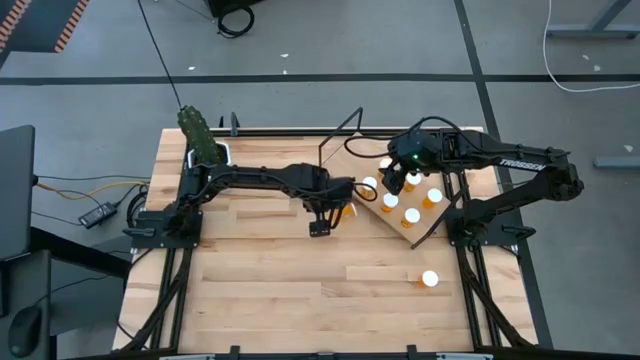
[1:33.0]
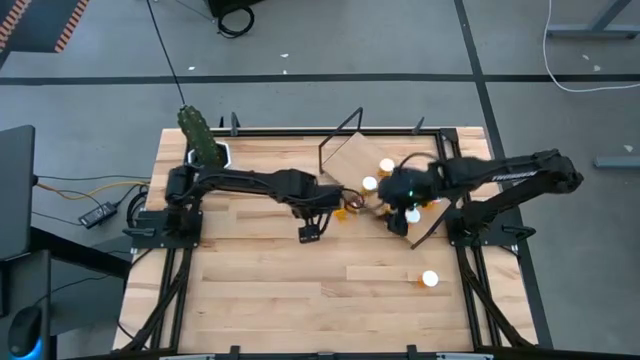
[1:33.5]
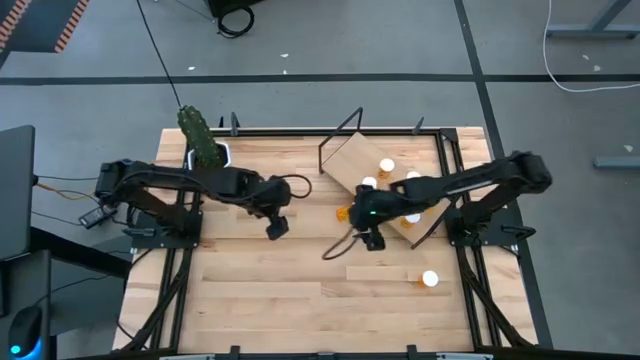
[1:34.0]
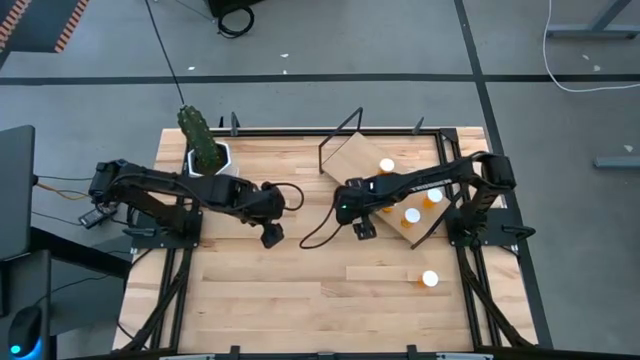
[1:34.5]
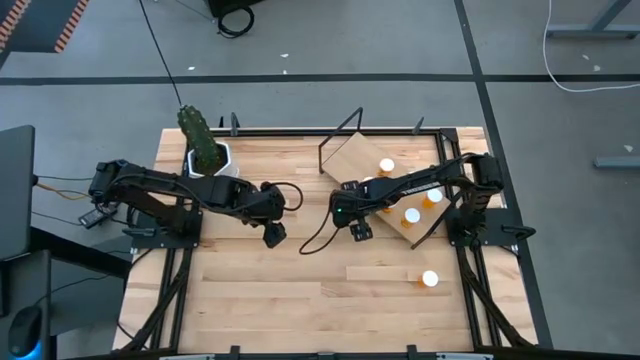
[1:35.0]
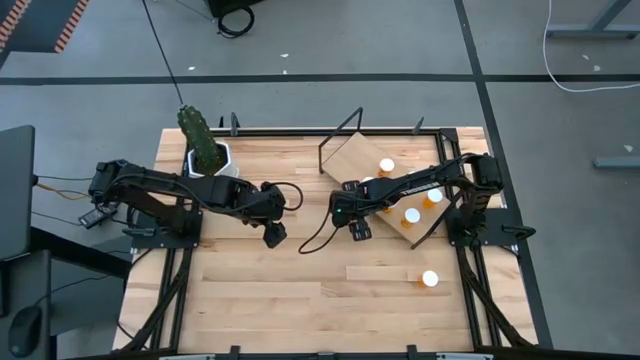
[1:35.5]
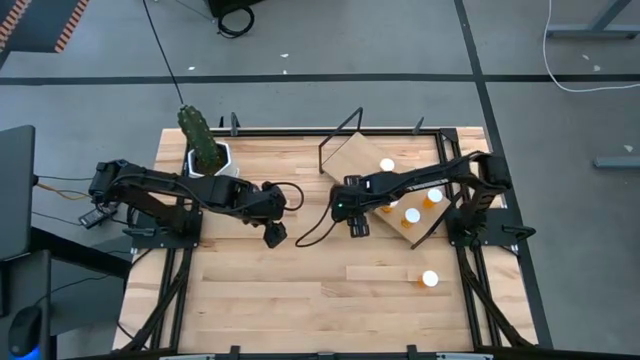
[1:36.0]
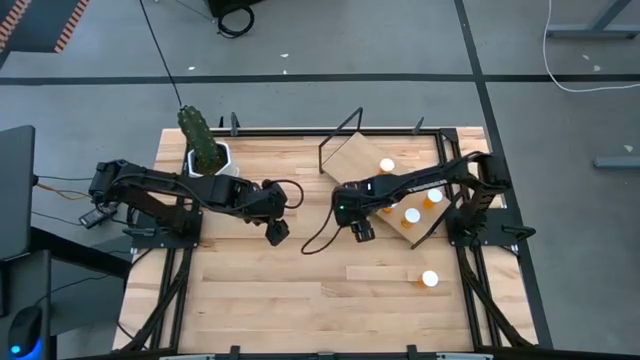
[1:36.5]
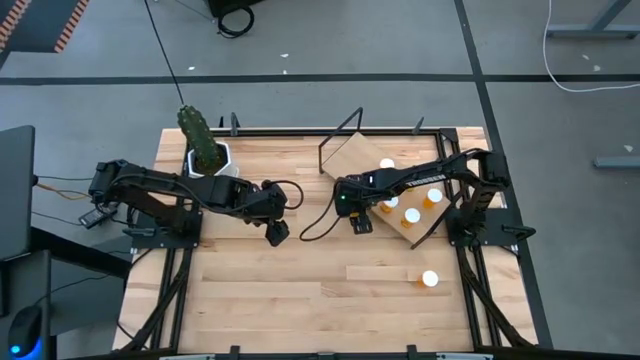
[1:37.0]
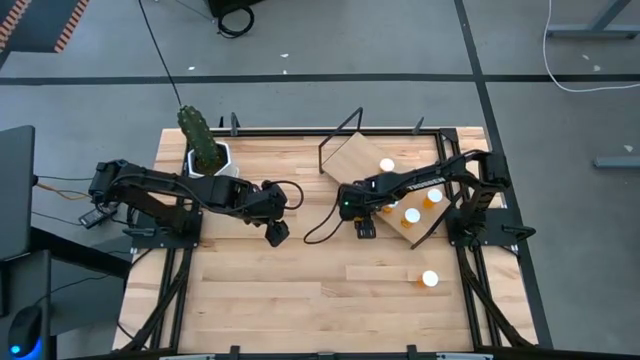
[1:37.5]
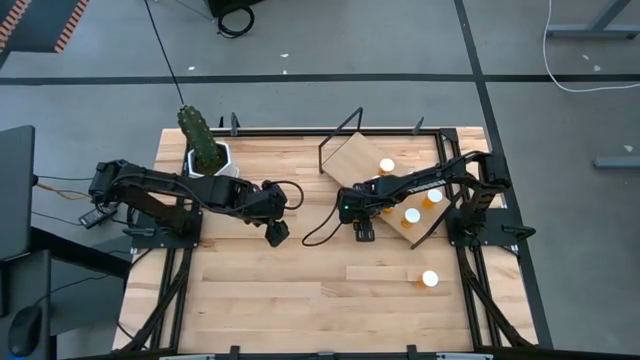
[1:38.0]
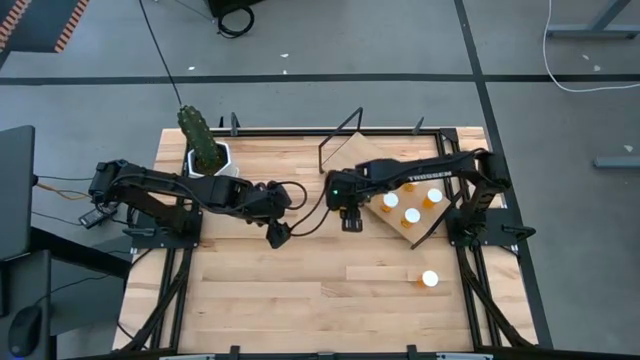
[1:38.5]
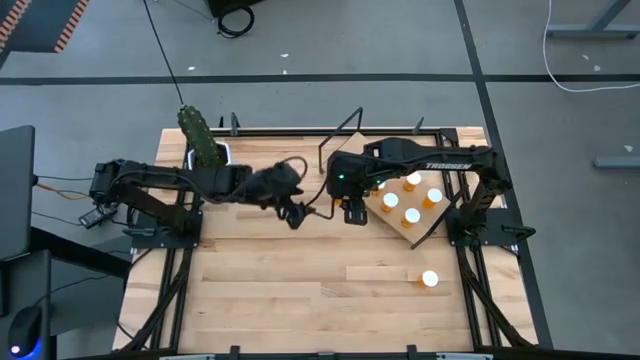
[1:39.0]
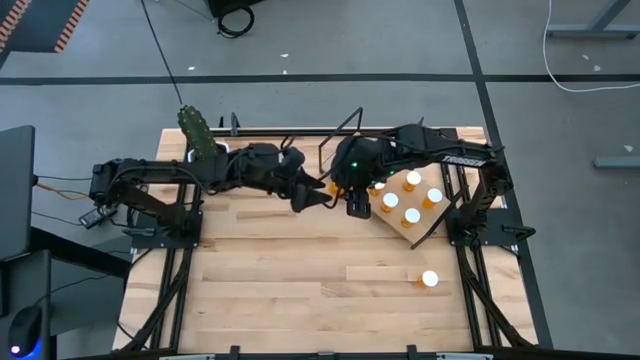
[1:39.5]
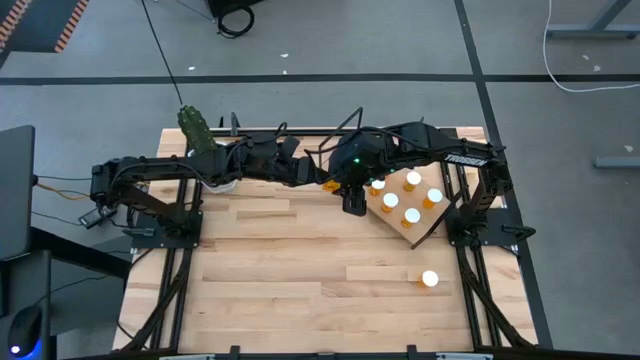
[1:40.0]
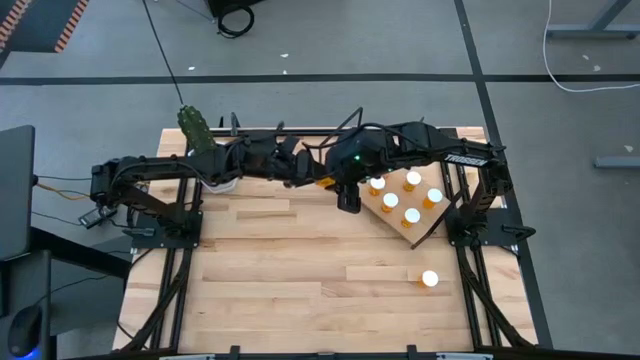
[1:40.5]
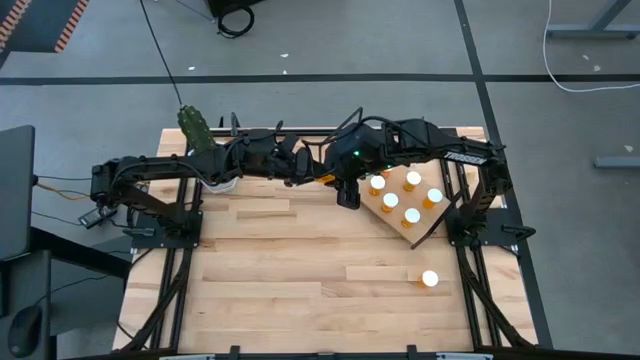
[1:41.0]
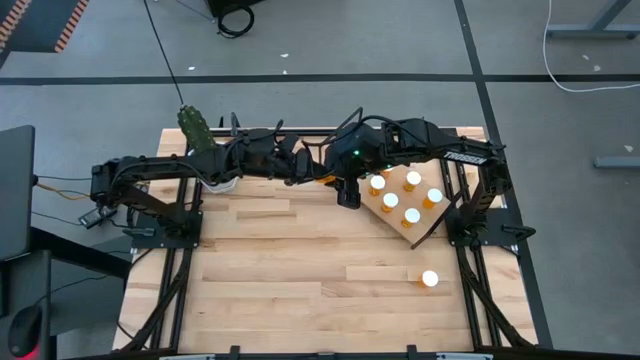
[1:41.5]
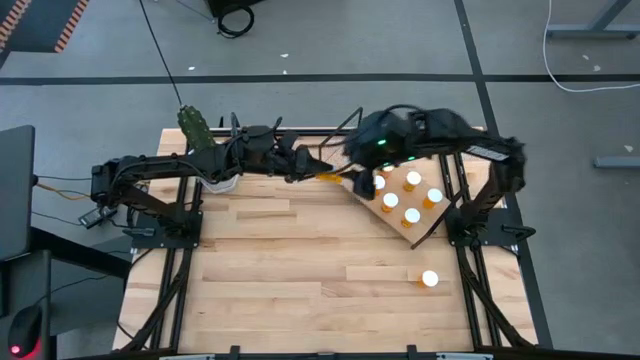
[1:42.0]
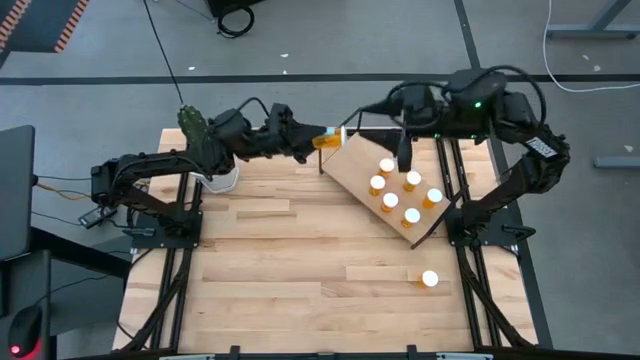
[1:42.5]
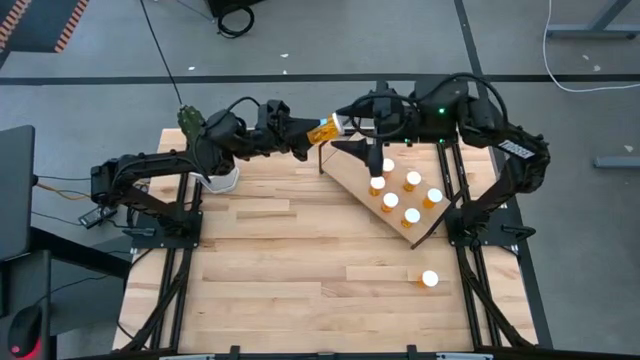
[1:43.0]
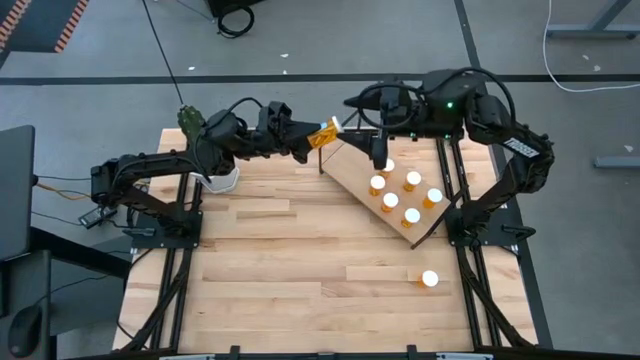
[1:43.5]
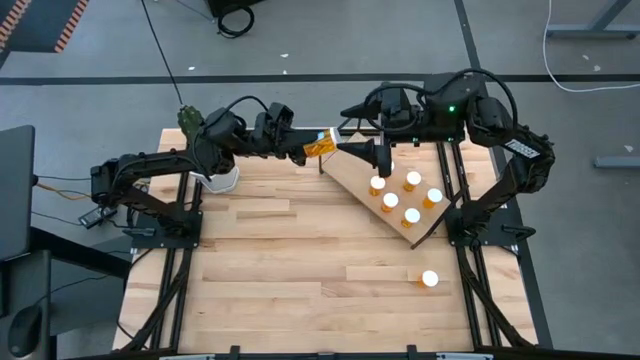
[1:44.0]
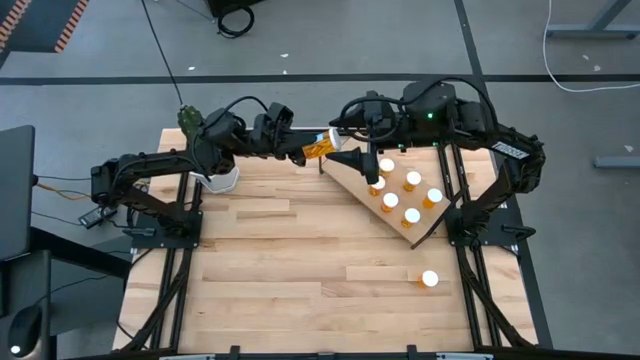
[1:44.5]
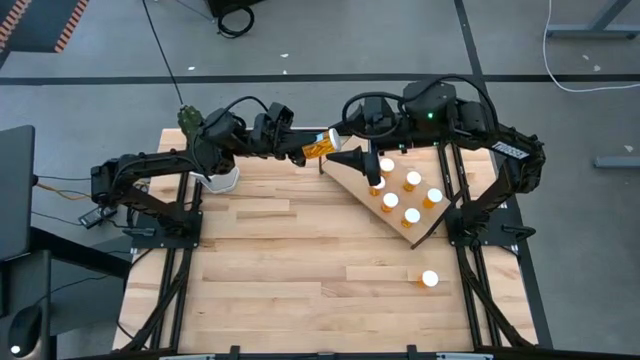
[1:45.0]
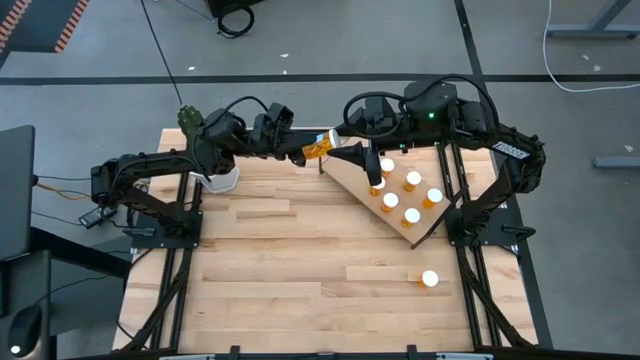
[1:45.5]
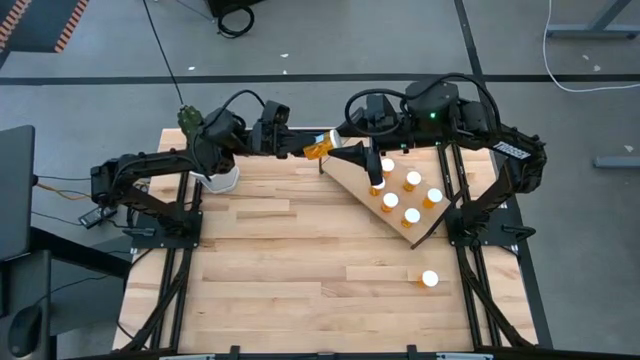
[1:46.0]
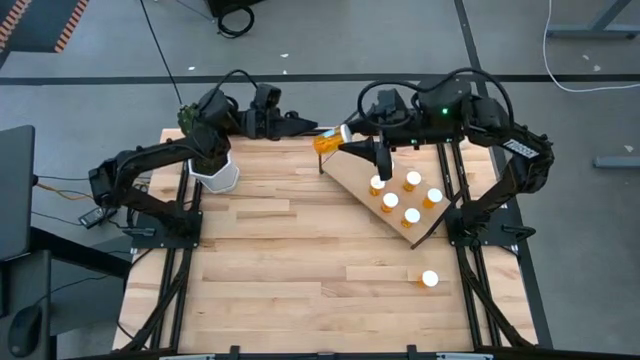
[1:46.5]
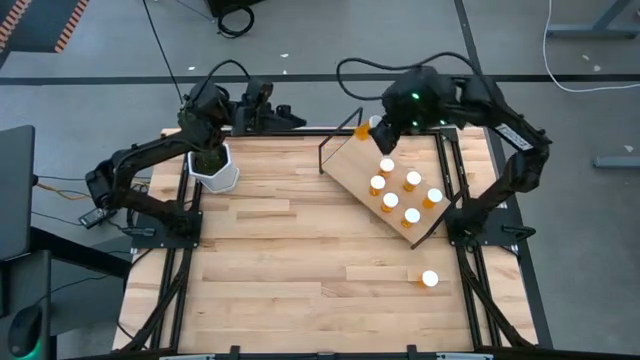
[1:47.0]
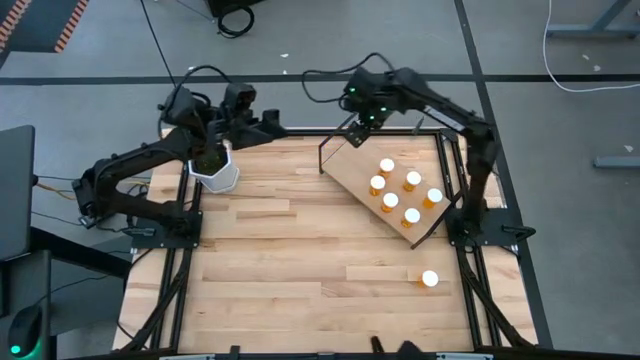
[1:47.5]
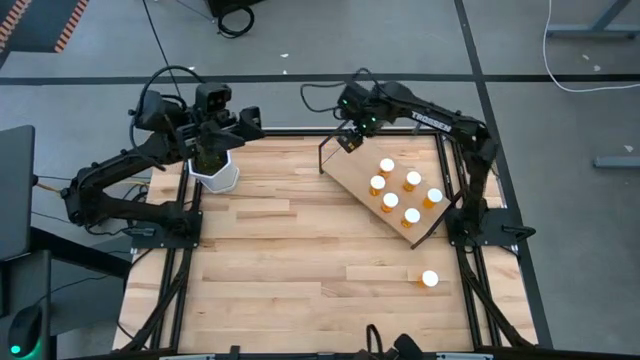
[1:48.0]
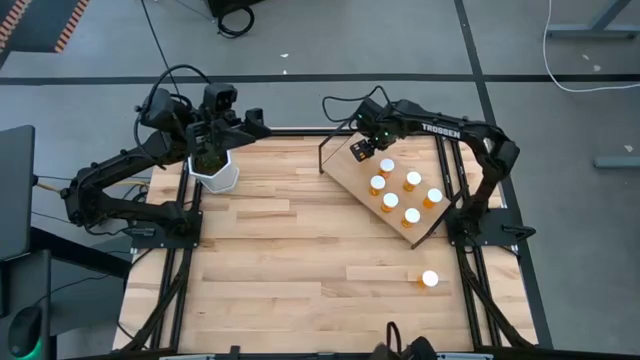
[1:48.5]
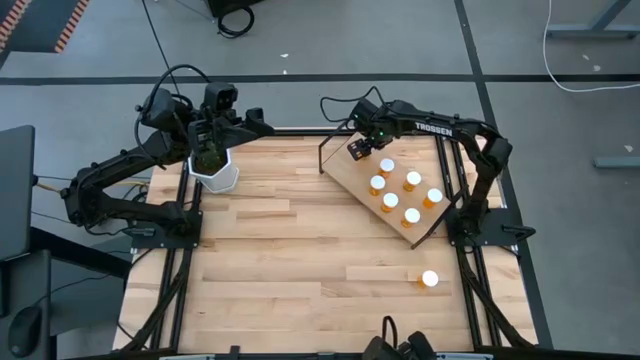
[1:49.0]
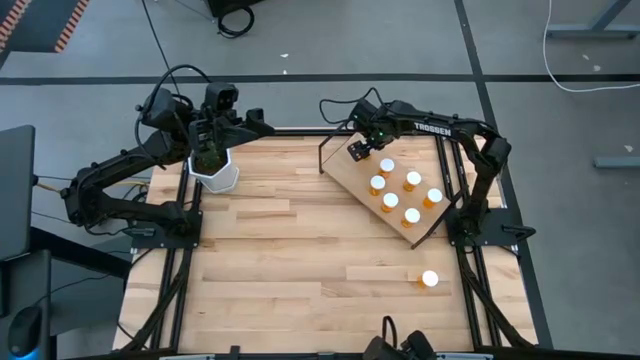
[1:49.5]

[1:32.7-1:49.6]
Task: Pick and place medicine bottles onto shelf by color
Put the orange pill bottle to the left on the shelf

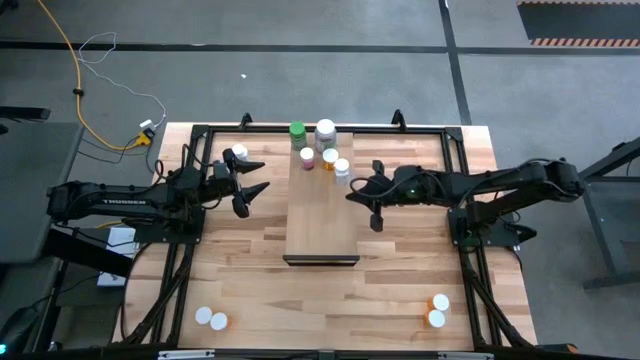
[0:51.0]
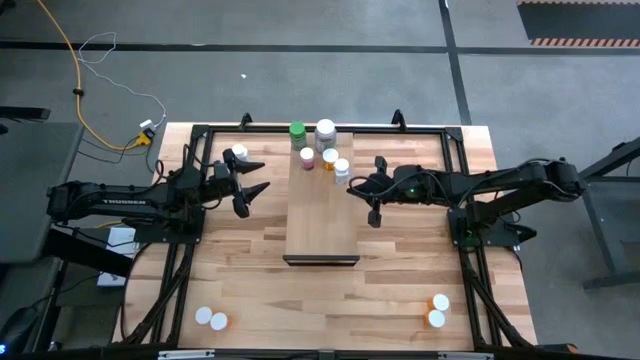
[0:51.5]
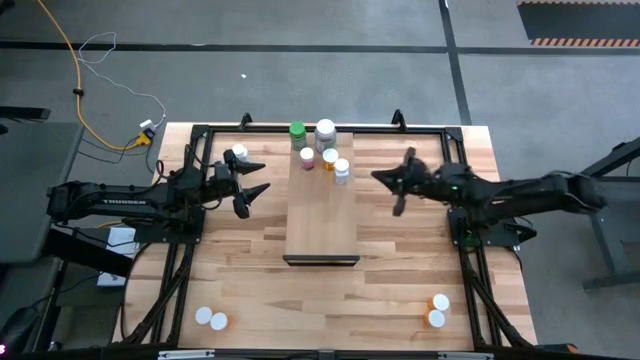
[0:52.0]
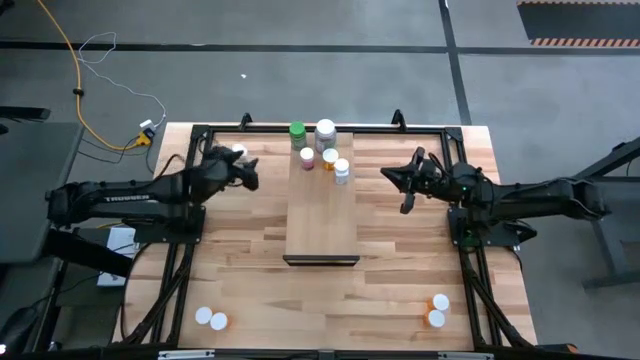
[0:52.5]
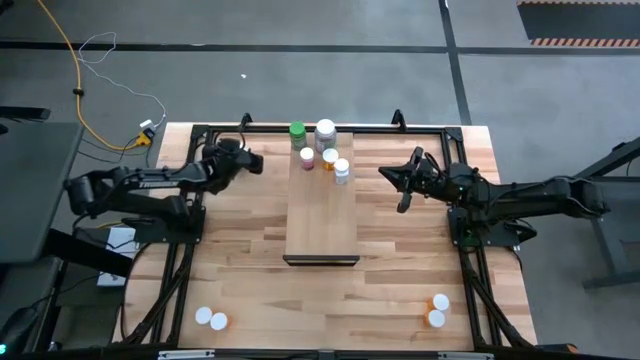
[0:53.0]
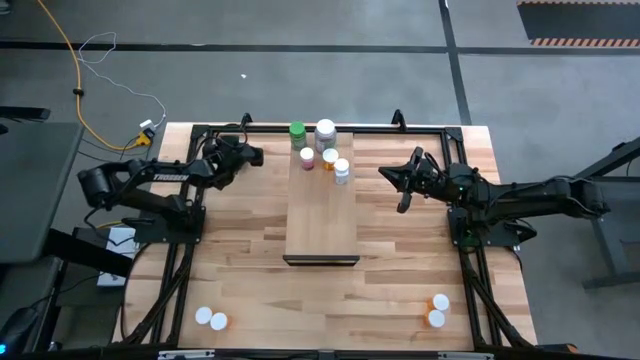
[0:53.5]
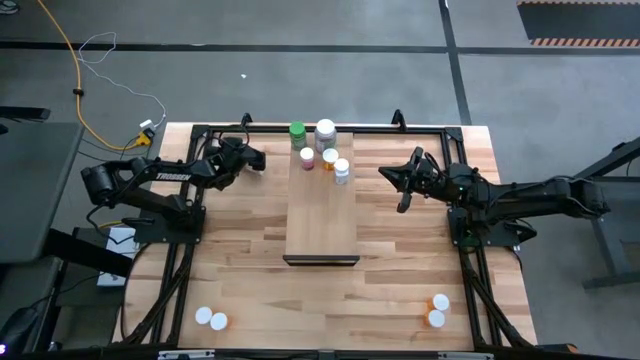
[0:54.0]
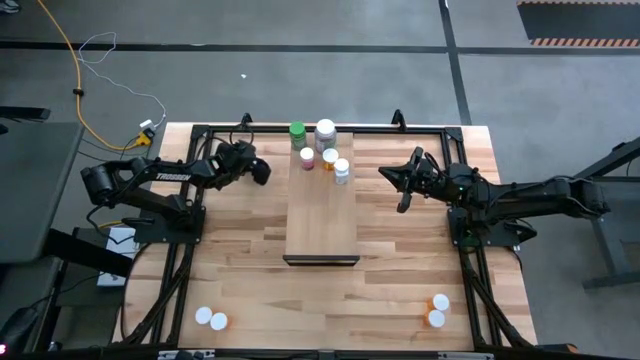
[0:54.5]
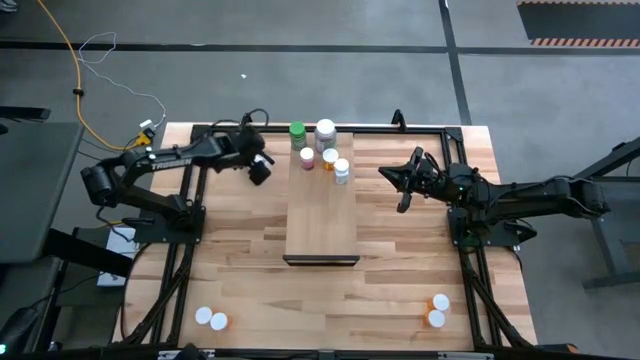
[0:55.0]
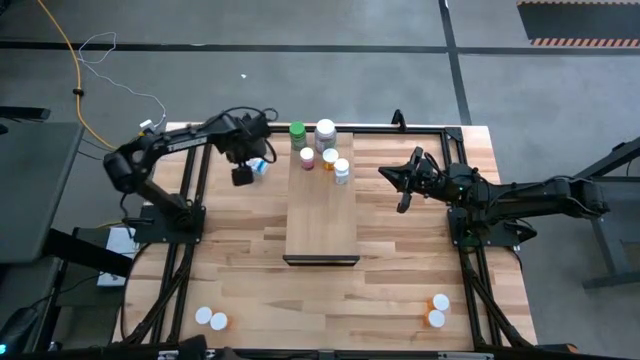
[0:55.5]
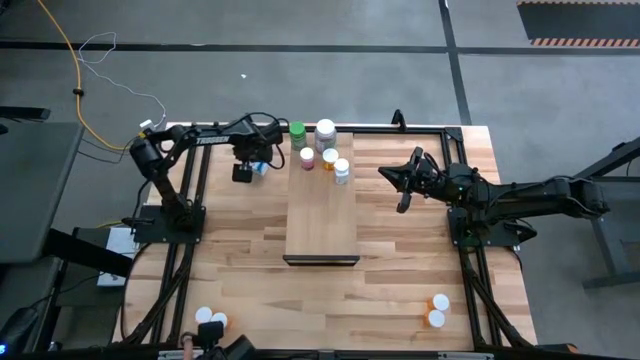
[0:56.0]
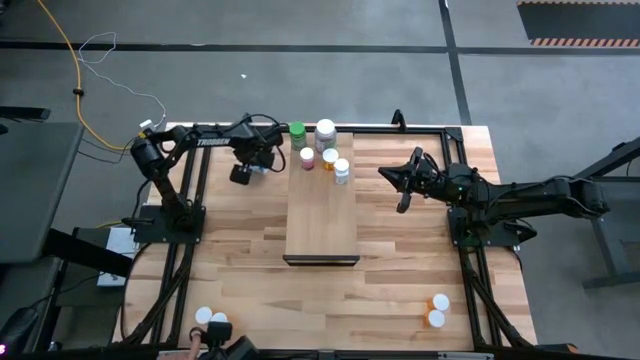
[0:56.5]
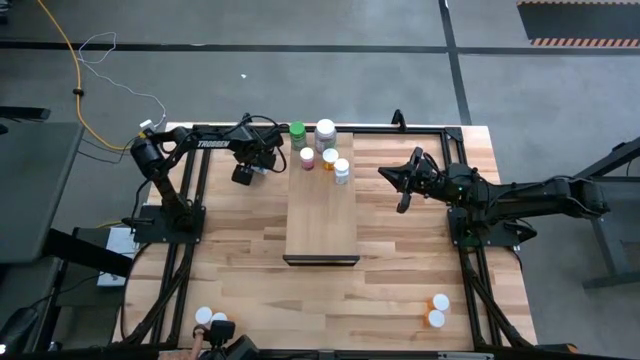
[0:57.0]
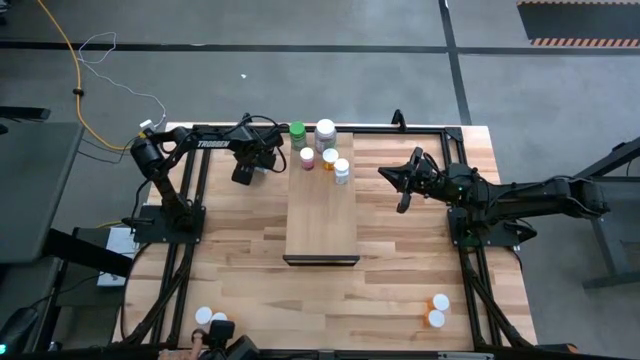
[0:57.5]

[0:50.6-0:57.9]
Task: Pick and place medicine bottles onto shelf by color
Put the pill bottle on the shelf
